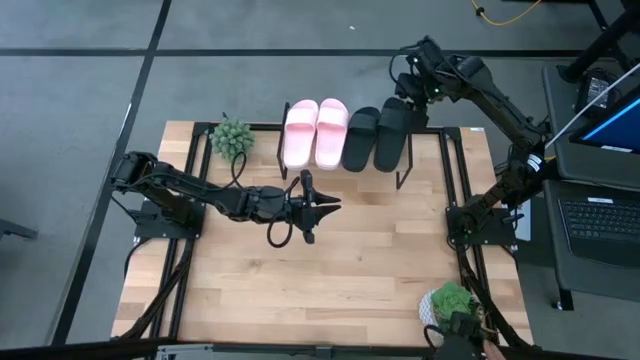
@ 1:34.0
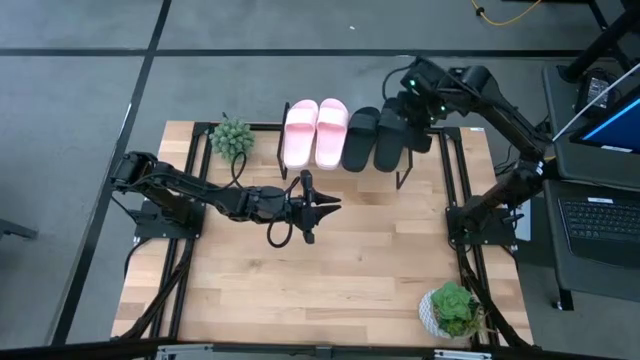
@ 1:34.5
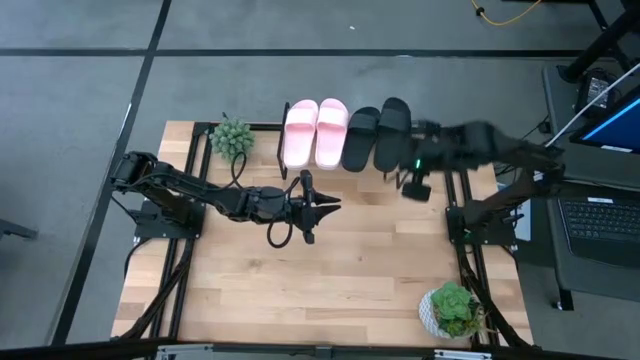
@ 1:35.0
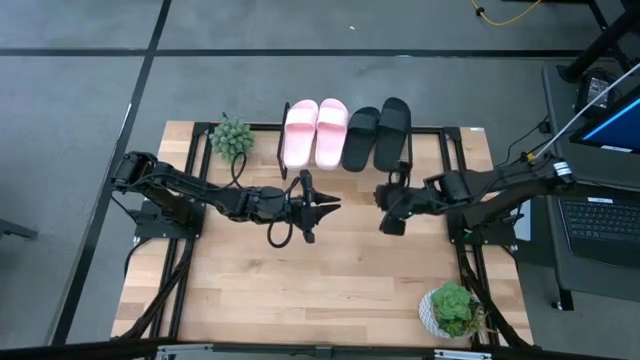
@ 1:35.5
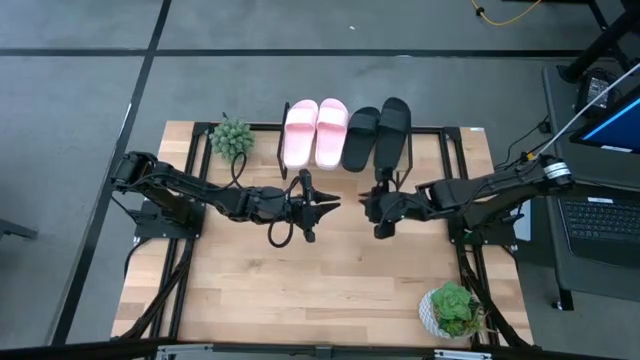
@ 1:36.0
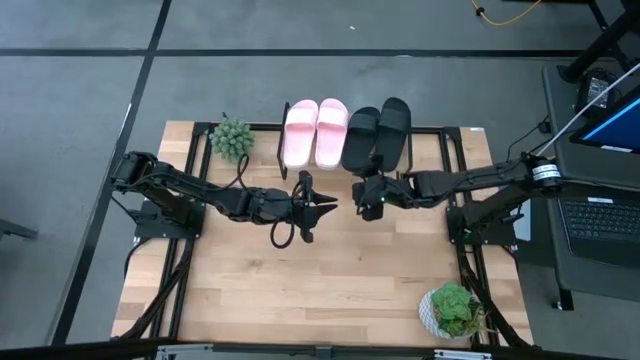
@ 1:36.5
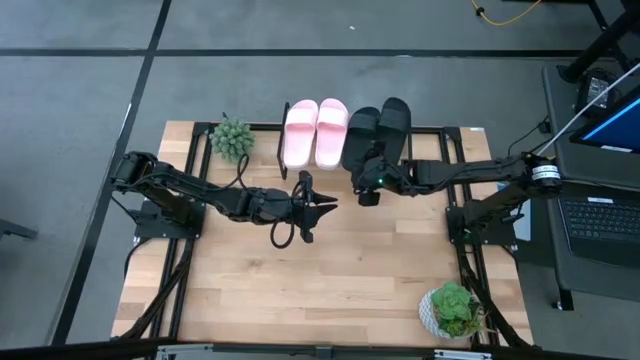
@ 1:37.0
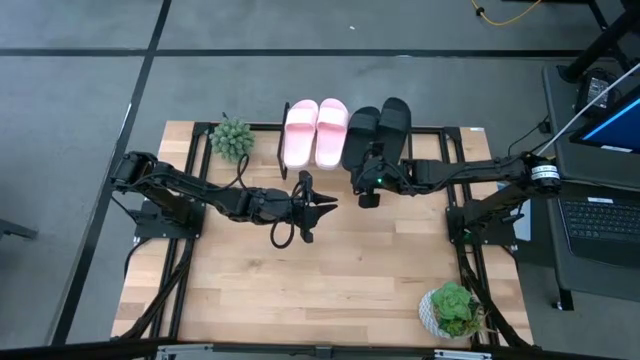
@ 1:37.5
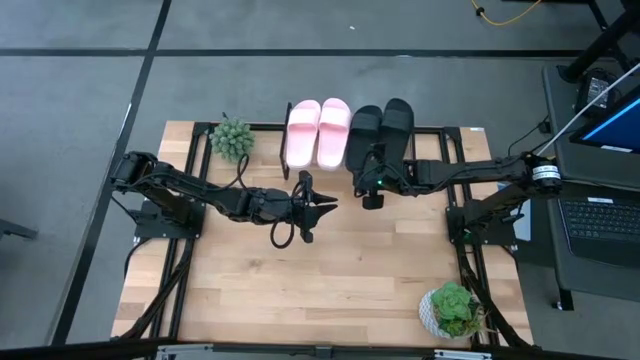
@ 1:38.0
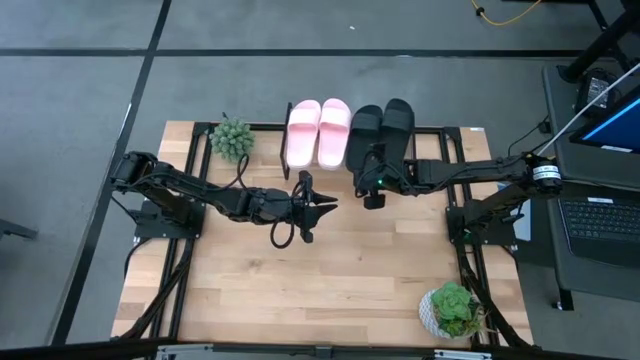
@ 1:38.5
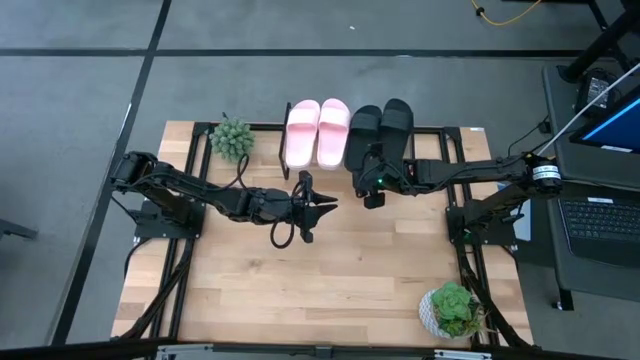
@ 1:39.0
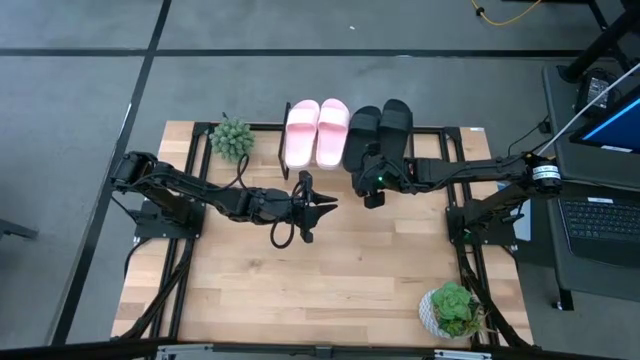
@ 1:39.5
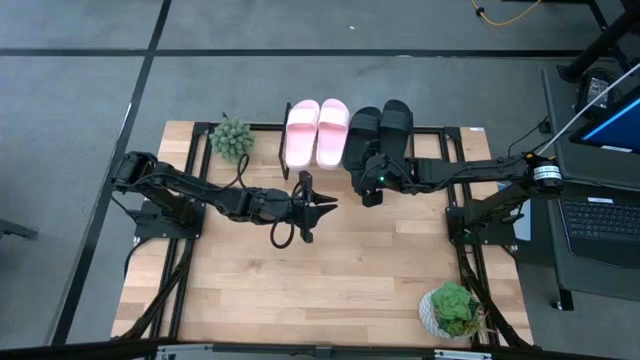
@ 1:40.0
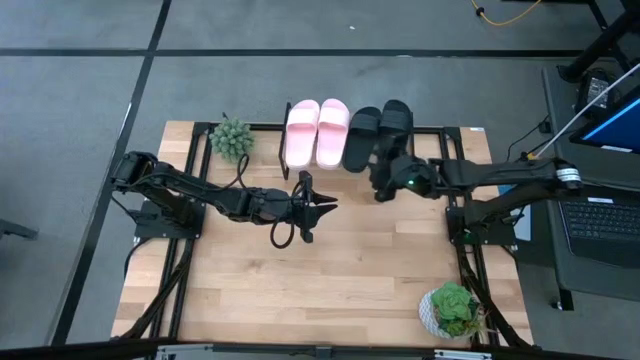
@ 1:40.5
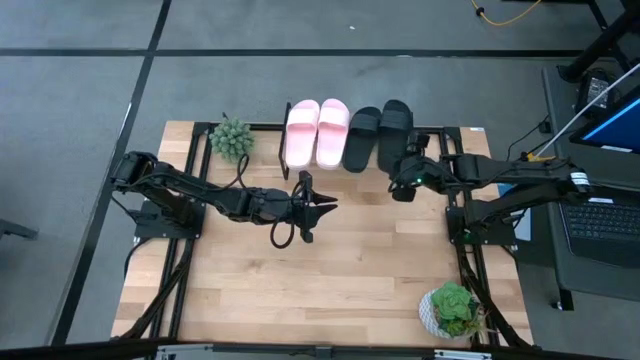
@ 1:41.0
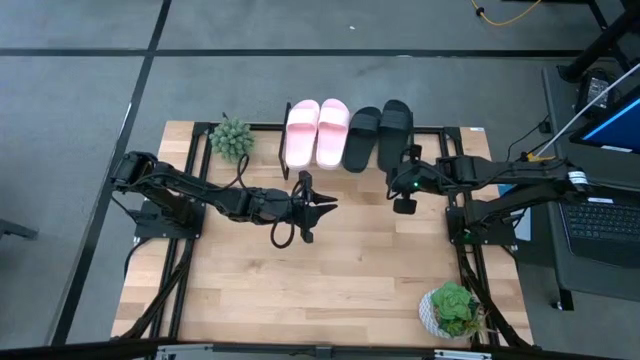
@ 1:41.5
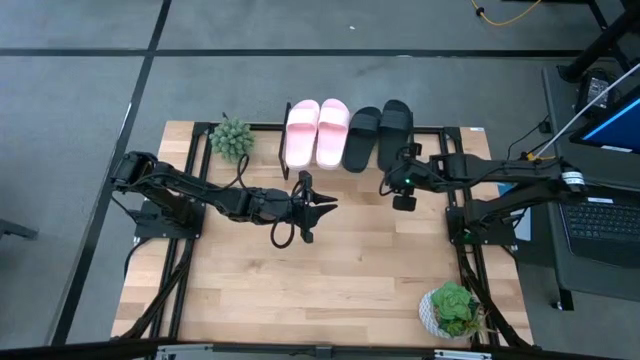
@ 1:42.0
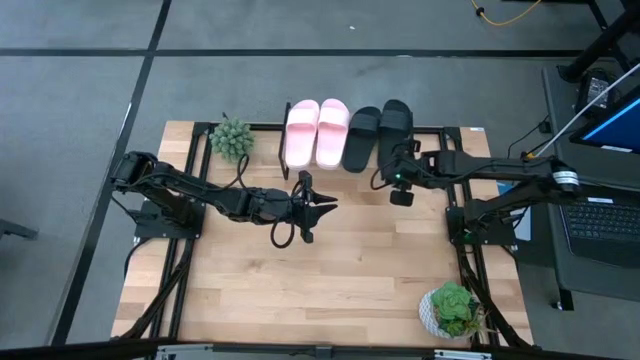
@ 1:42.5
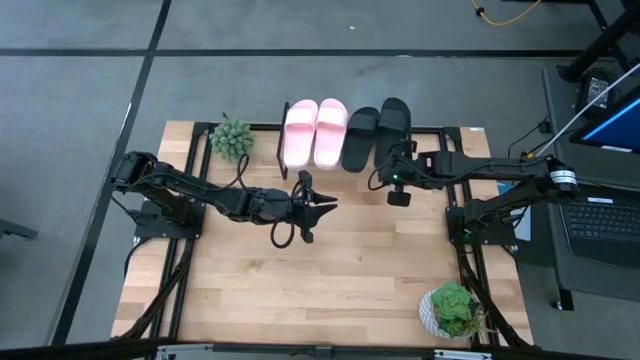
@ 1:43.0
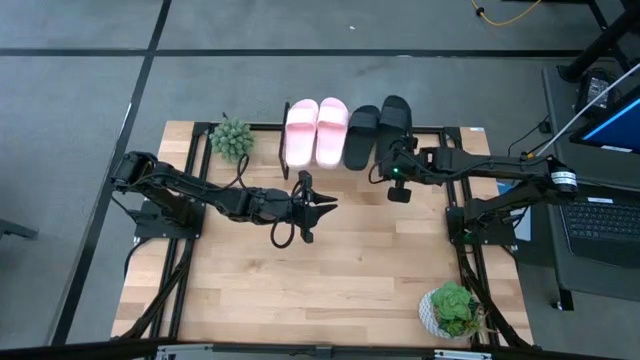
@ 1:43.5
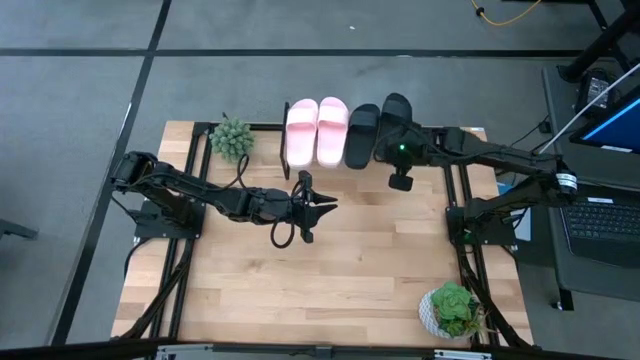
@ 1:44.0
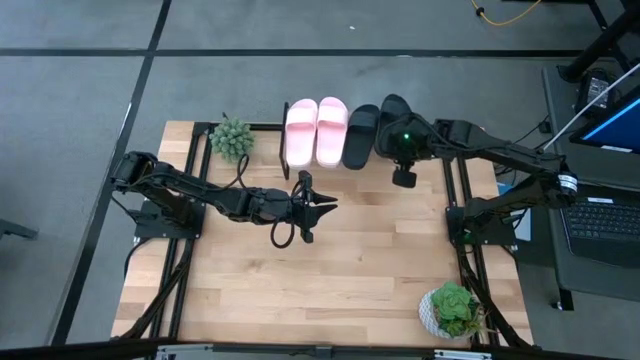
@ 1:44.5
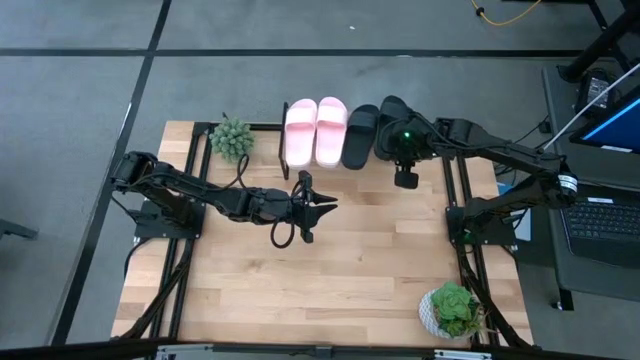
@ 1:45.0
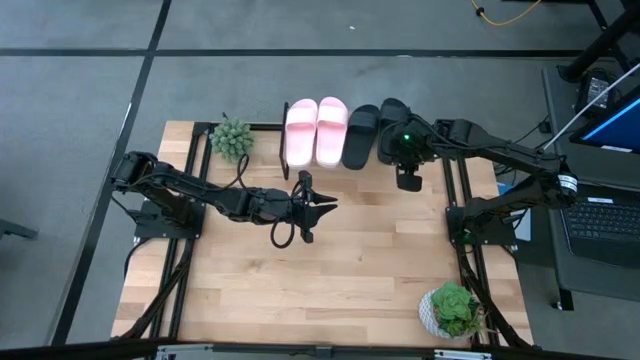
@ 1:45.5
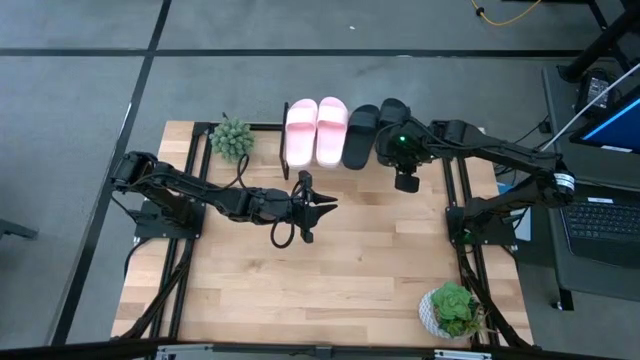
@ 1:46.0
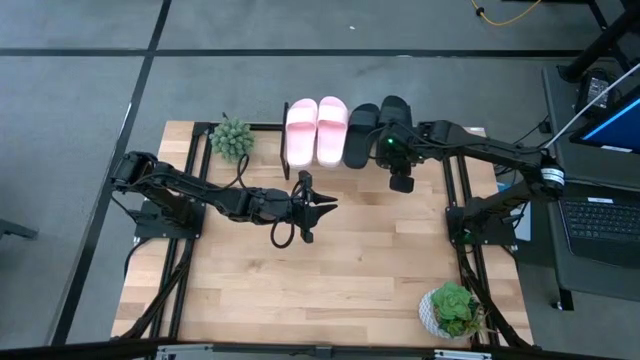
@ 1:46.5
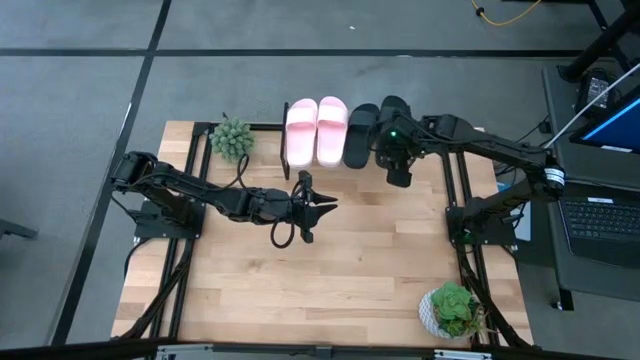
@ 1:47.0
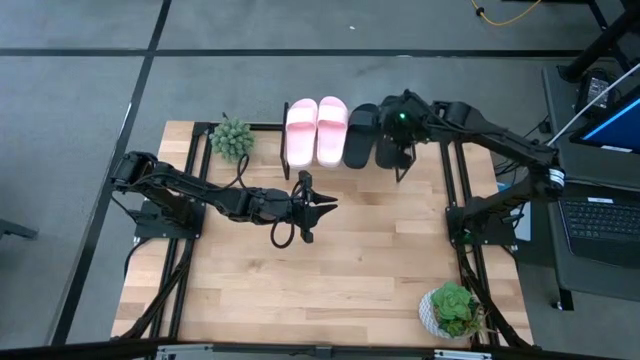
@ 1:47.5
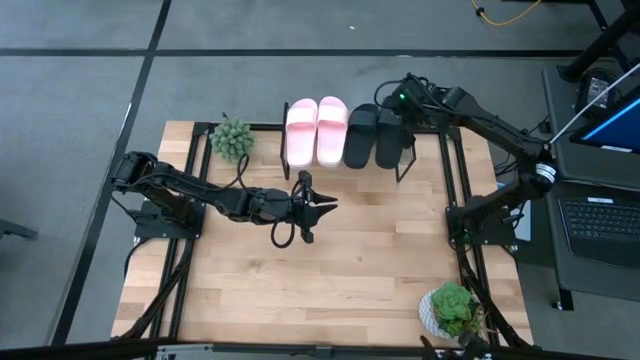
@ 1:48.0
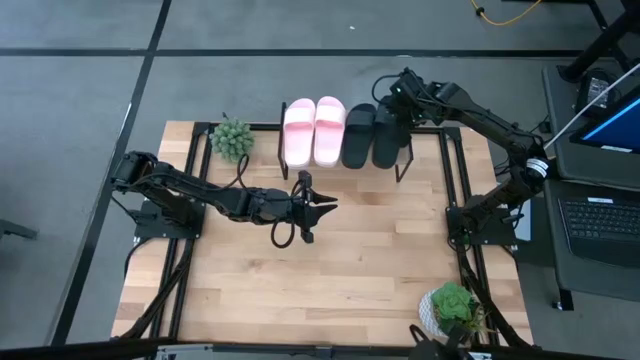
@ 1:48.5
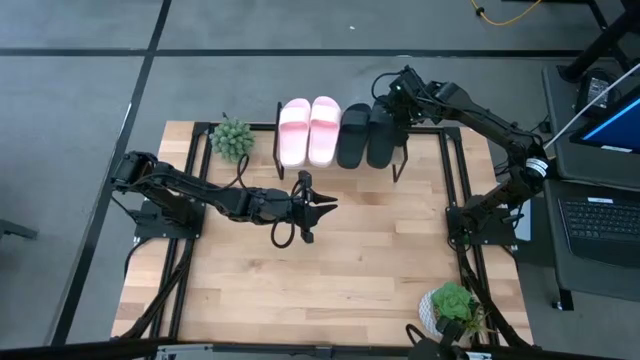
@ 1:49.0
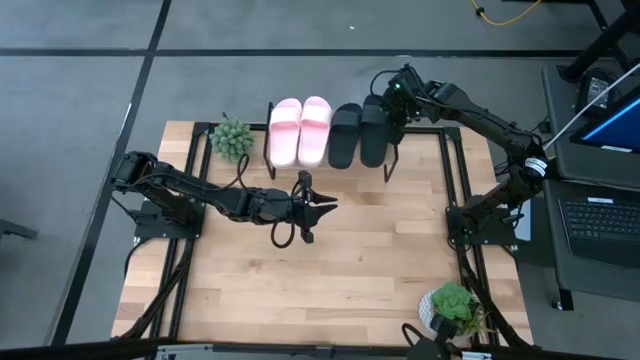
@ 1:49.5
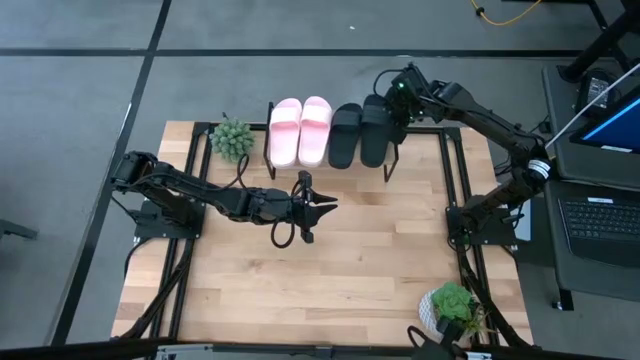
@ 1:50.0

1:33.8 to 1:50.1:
Task: Pick and place slides into the shelf
Adjust the black slippers on the shelf

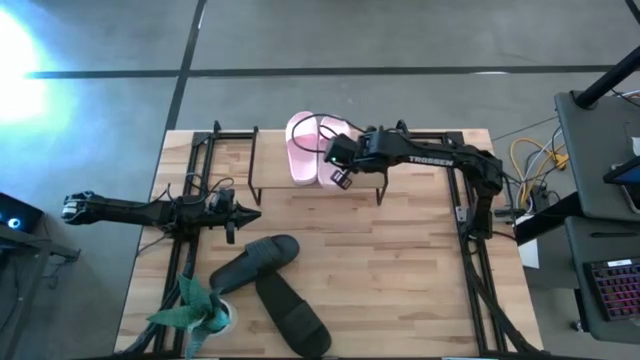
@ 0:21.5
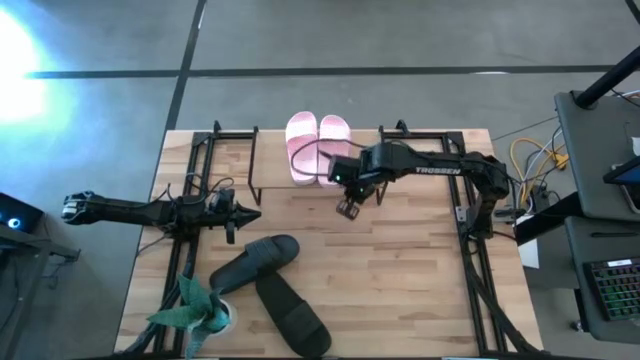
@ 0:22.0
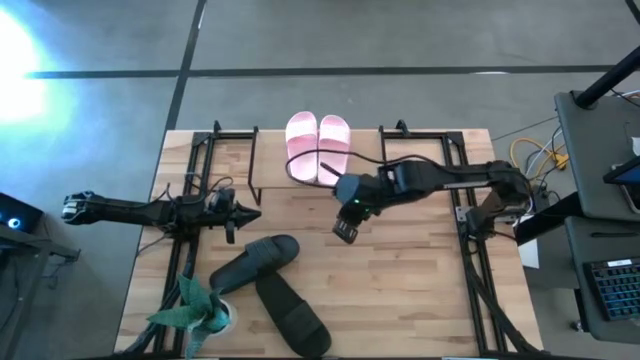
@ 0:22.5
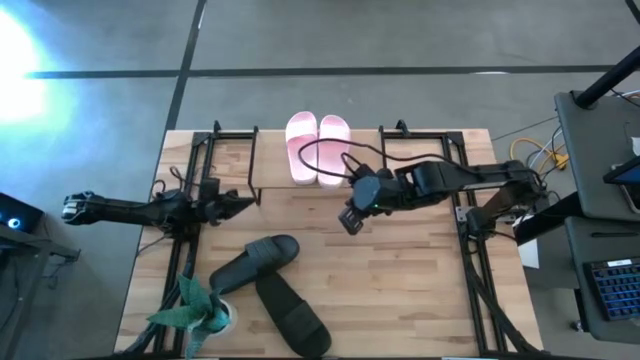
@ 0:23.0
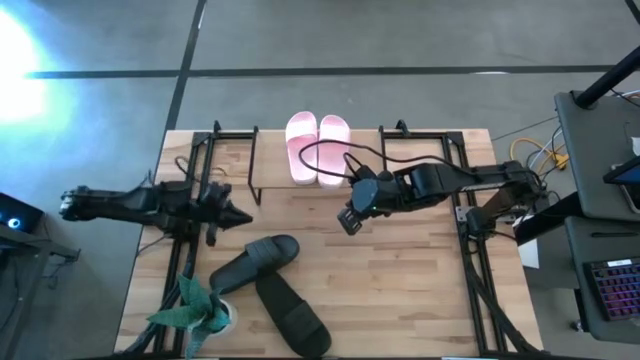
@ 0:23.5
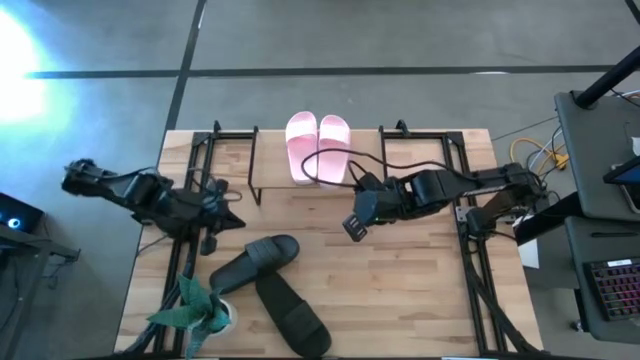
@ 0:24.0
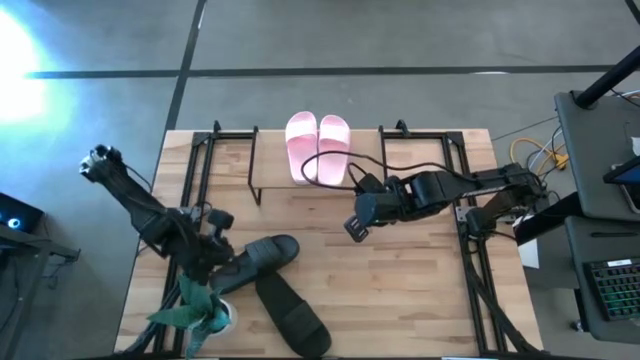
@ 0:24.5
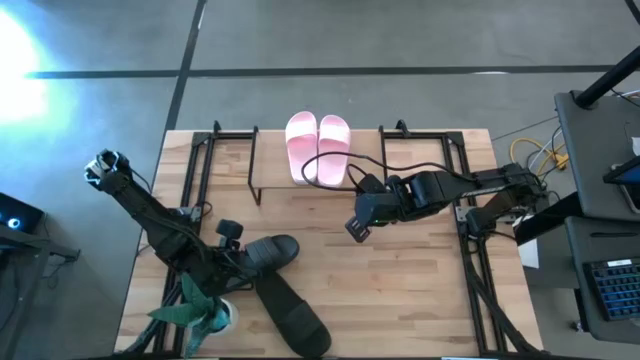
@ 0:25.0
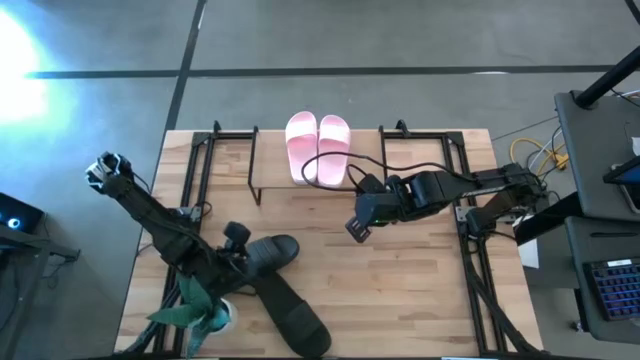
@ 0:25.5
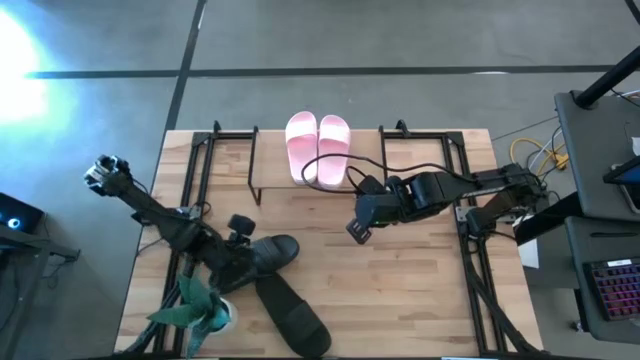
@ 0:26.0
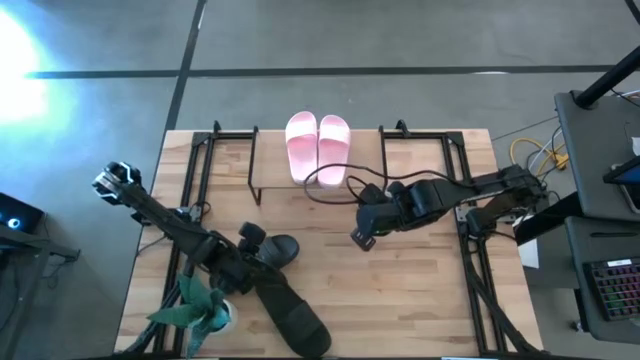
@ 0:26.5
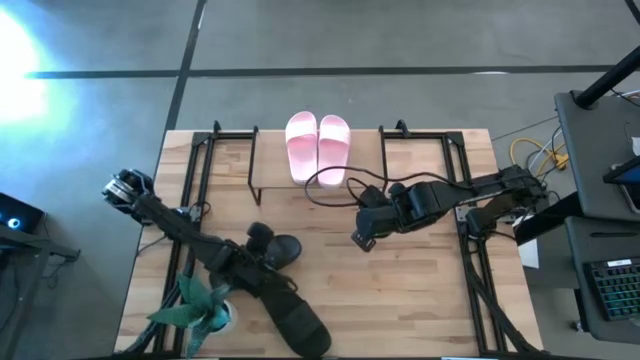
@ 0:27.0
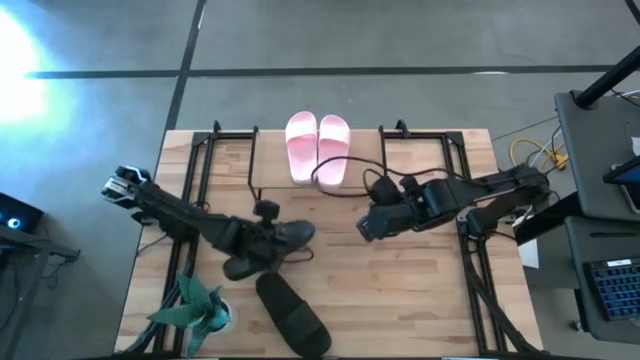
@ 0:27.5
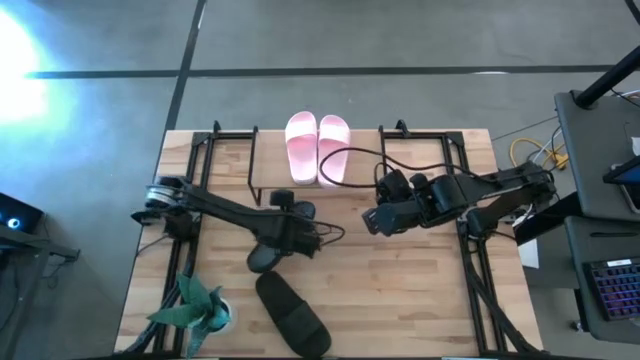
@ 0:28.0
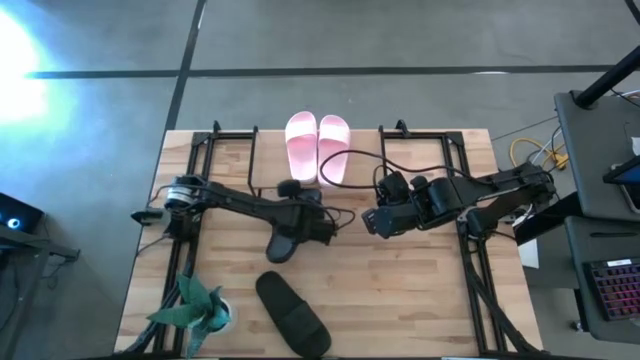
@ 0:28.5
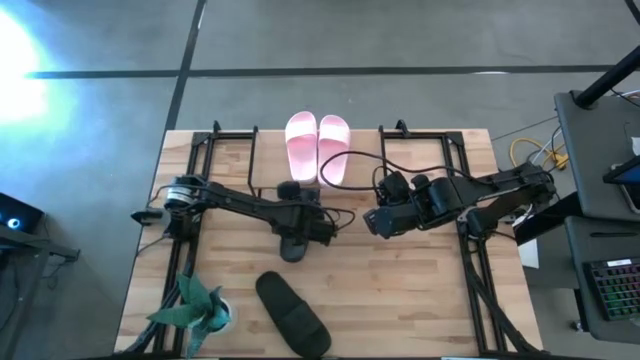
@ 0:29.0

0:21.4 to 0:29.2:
Task: Pick and place slides into the shelf
Put the top black slide under the shelf
